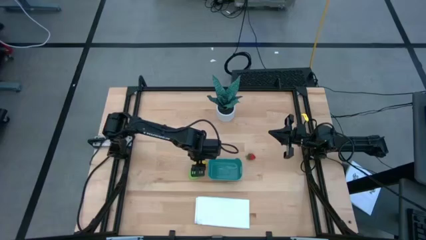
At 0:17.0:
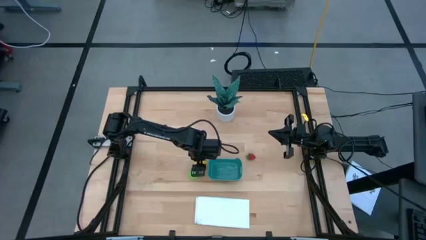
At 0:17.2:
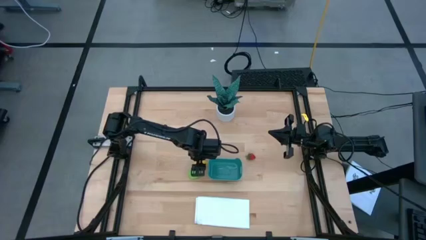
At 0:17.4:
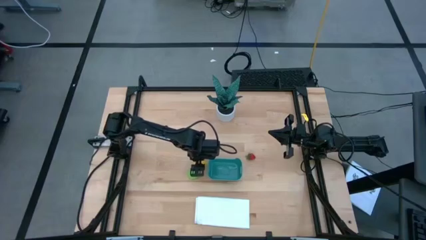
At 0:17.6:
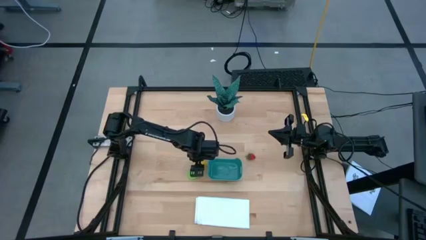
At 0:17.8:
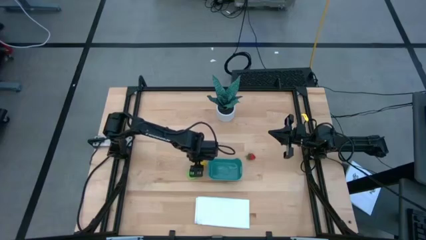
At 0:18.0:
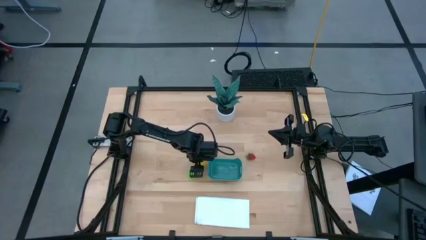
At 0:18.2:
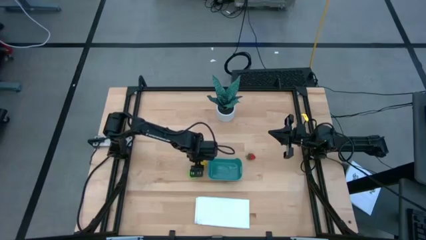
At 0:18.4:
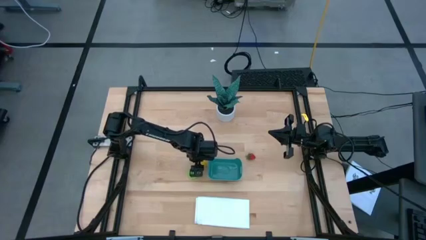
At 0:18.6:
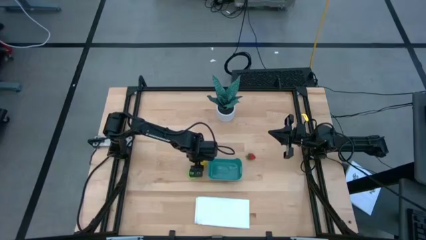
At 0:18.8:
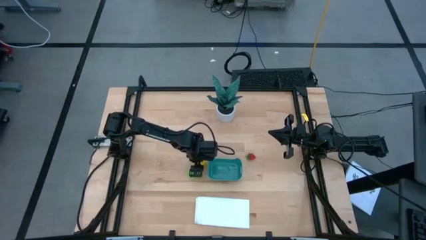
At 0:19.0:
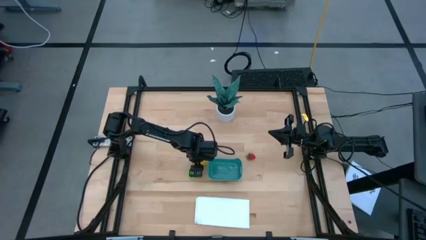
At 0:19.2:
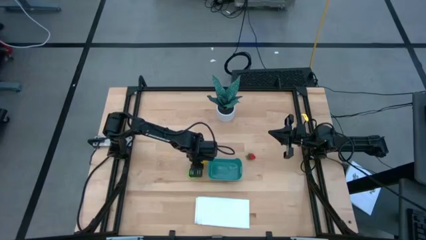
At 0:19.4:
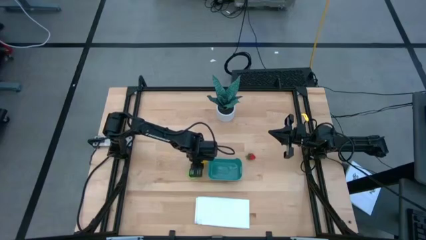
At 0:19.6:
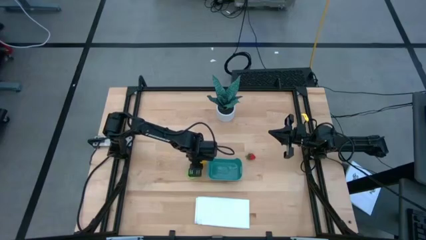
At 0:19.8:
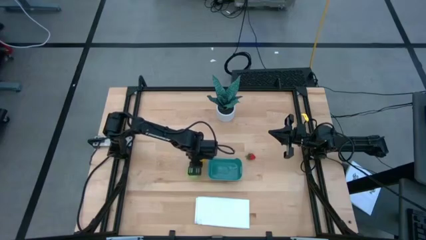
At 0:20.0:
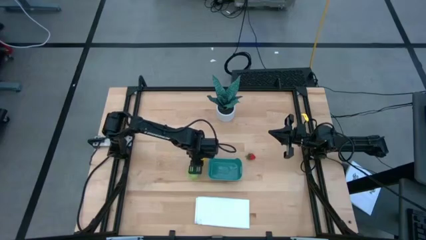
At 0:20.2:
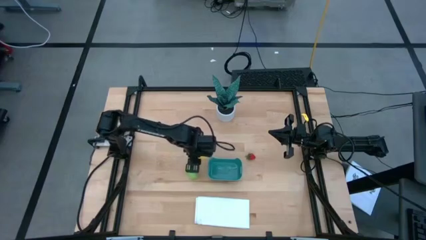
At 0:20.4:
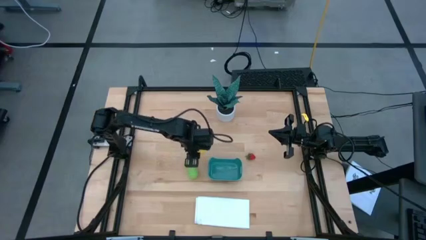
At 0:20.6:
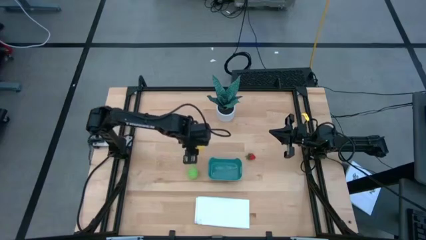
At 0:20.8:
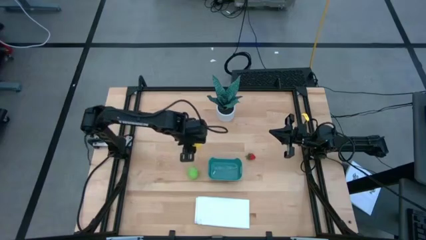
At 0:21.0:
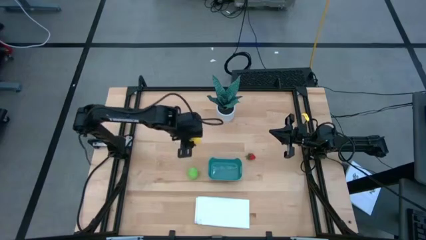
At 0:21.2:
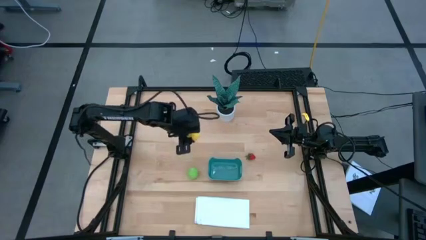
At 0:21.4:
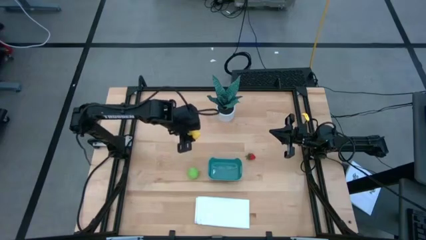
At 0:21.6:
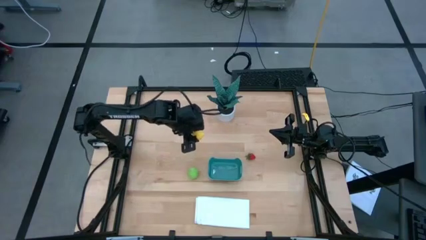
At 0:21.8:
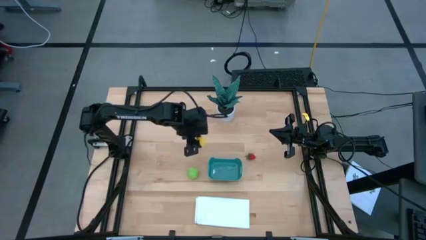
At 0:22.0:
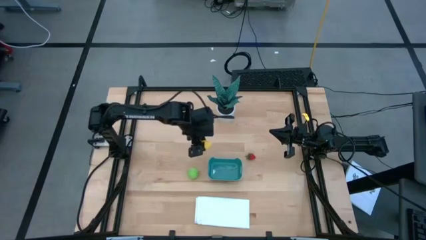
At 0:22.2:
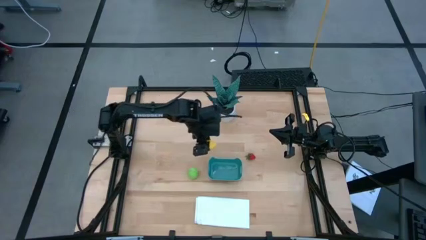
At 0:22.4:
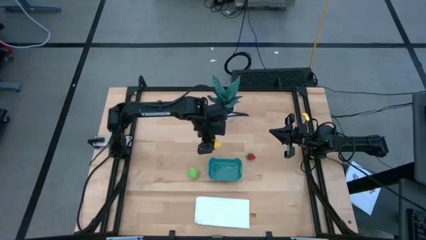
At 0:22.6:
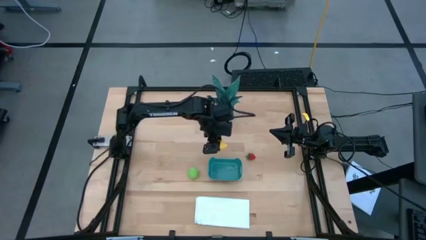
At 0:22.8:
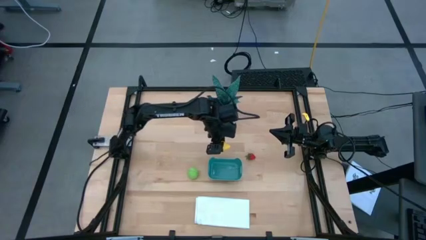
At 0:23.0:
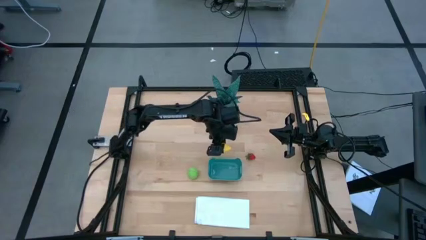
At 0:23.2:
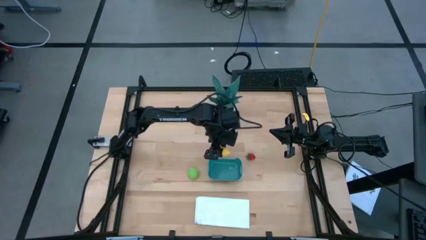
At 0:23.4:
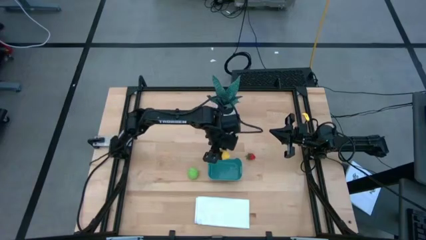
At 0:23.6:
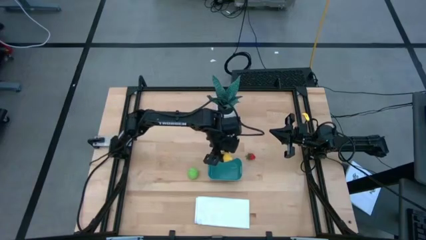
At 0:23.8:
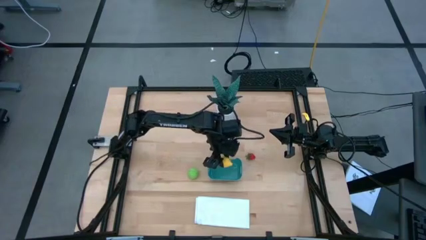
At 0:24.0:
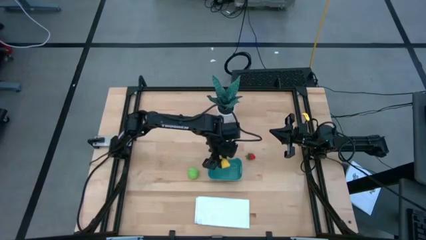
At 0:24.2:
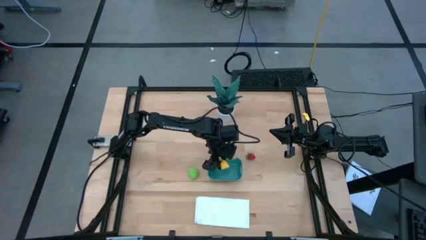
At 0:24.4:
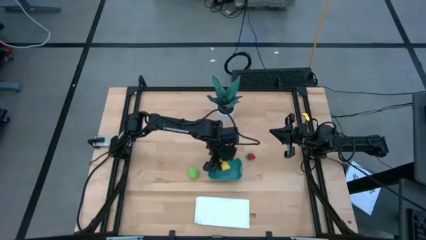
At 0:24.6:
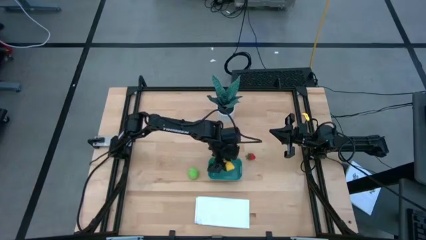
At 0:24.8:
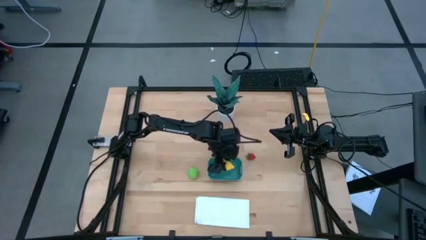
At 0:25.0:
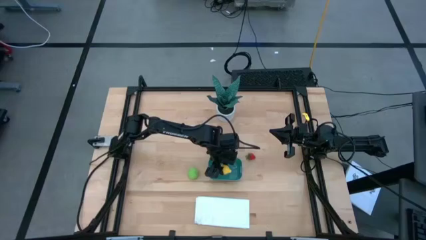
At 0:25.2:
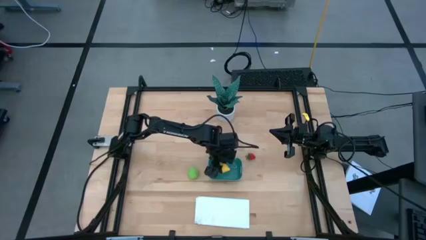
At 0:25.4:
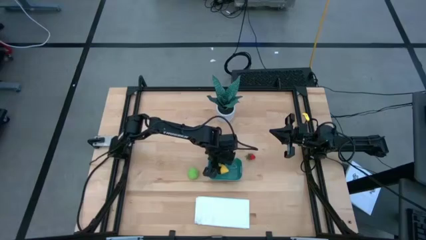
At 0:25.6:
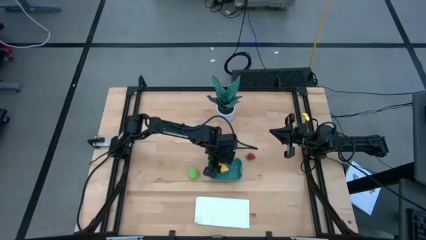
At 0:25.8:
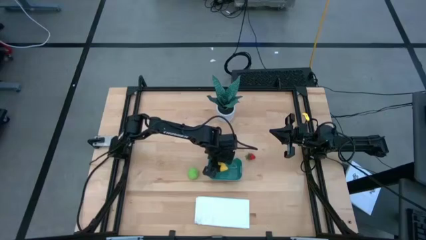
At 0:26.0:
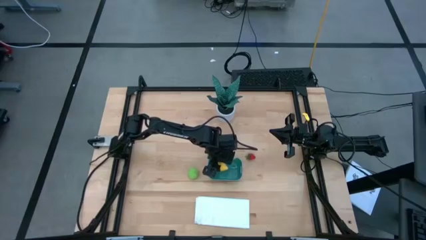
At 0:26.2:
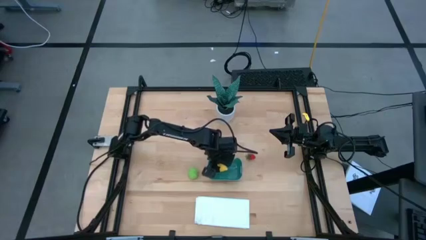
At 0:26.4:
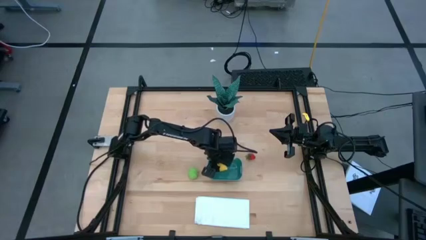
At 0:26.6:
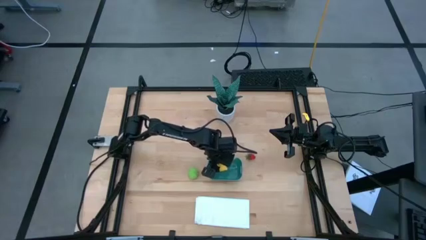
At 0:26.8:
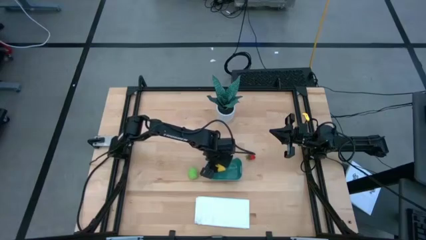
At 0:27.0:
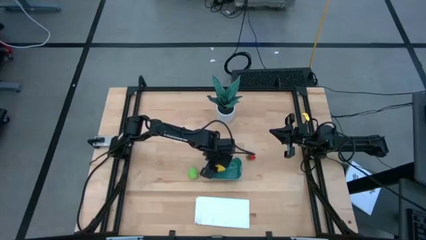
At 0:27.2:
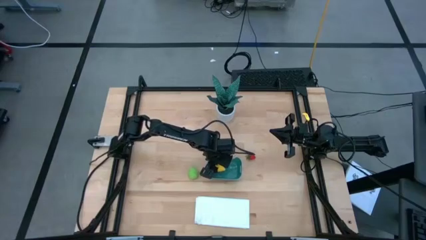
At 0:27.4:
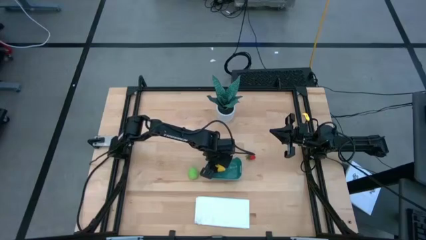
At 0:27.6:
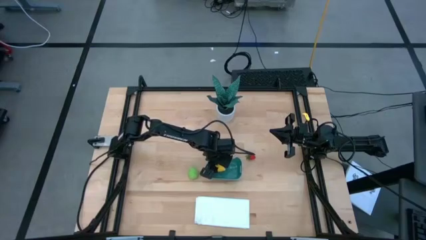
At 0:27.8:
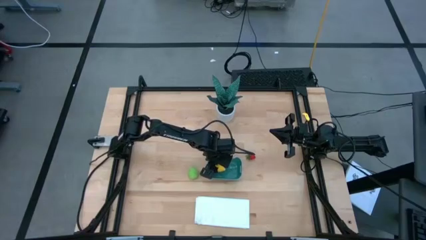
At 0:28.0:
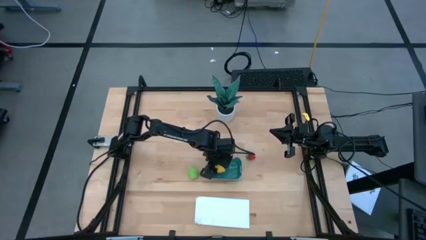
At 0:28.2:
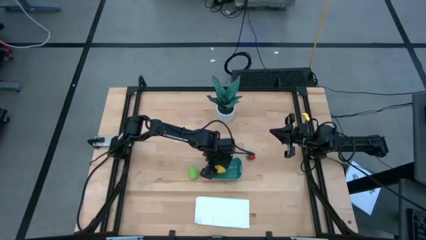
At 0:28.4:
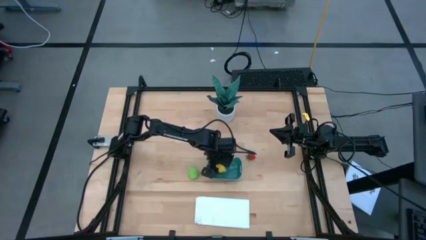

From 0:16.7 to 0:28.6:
Task: Pick and placing Produce into tupperware
Put the yellow lemon into the green bin

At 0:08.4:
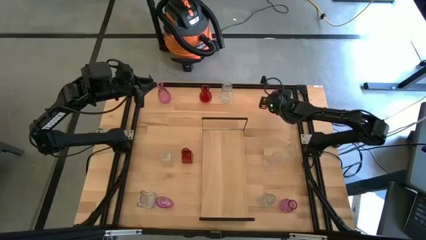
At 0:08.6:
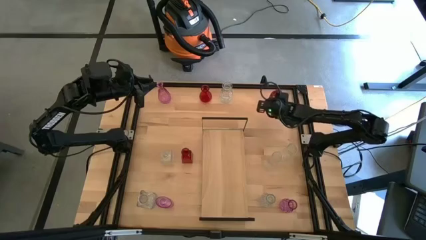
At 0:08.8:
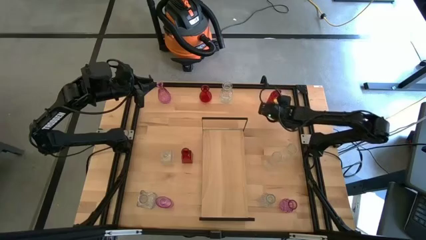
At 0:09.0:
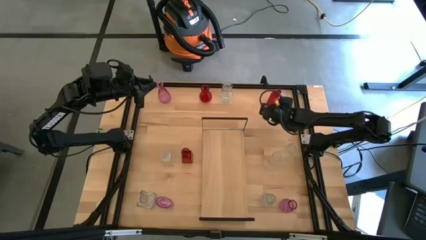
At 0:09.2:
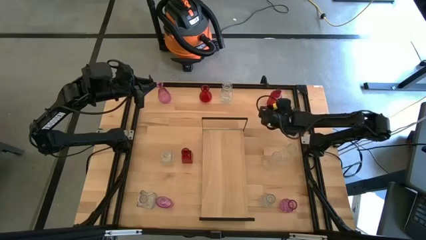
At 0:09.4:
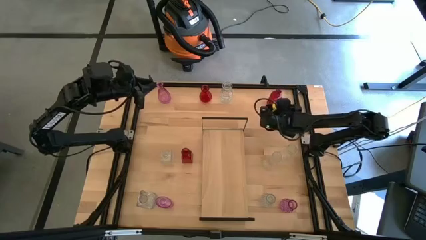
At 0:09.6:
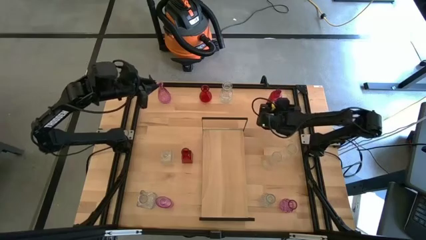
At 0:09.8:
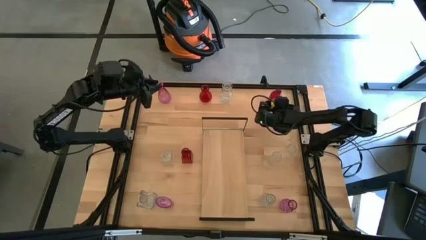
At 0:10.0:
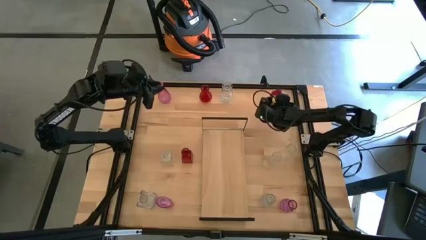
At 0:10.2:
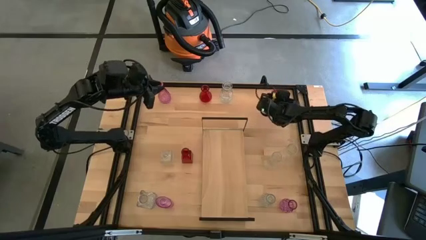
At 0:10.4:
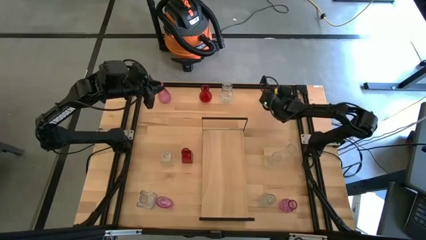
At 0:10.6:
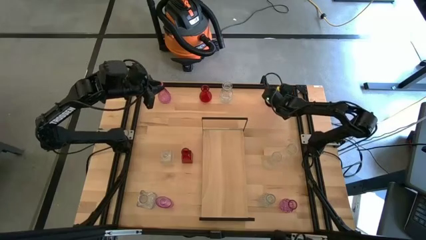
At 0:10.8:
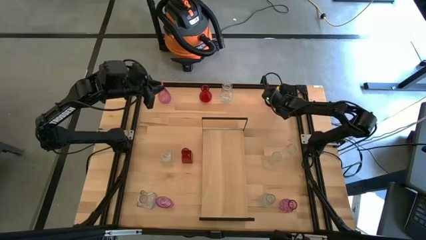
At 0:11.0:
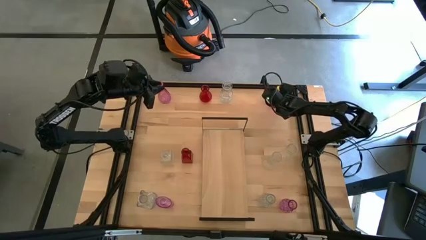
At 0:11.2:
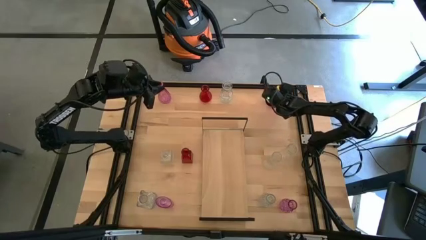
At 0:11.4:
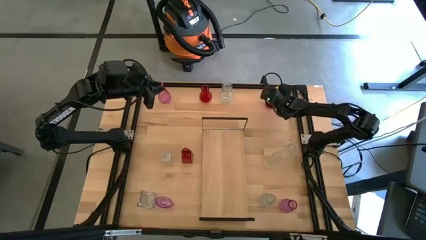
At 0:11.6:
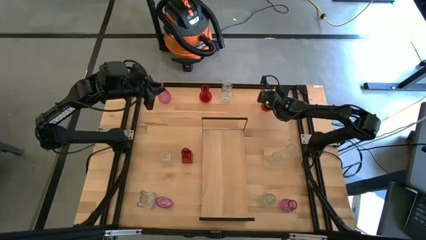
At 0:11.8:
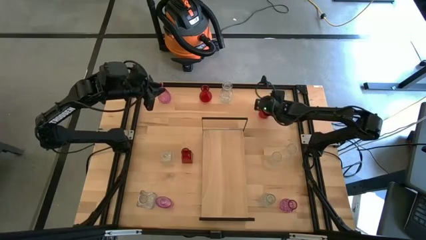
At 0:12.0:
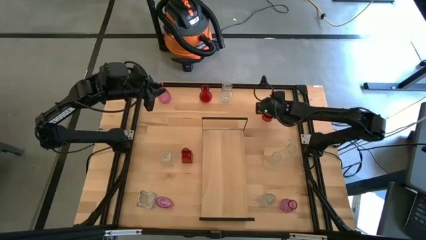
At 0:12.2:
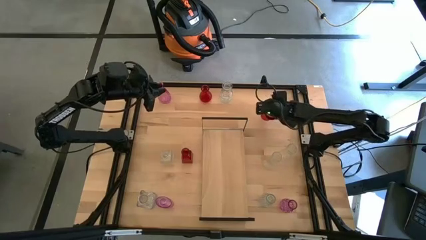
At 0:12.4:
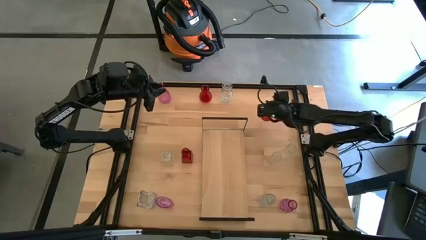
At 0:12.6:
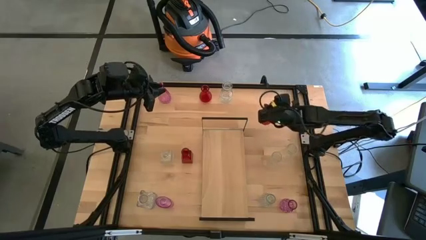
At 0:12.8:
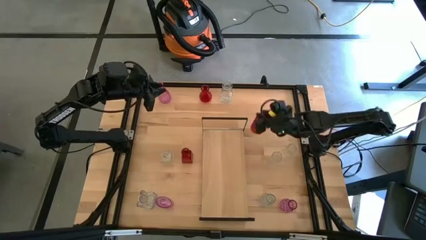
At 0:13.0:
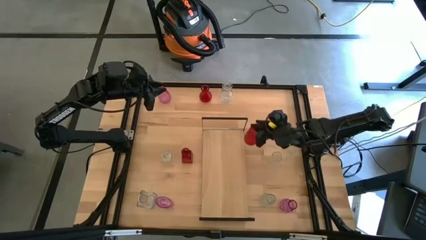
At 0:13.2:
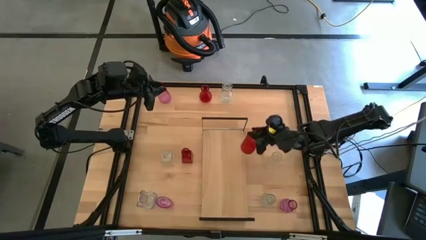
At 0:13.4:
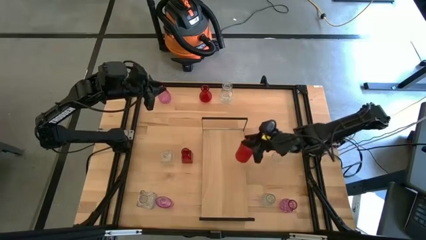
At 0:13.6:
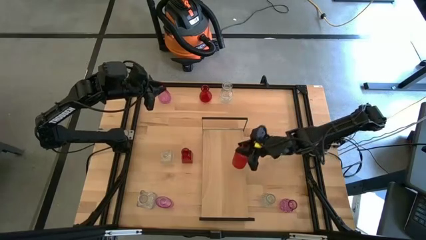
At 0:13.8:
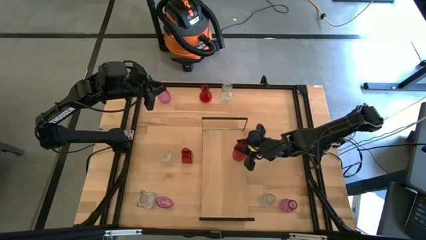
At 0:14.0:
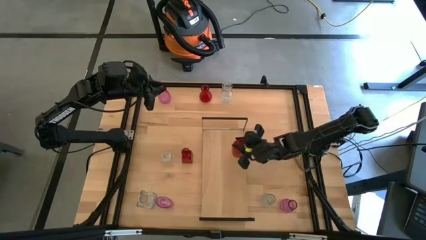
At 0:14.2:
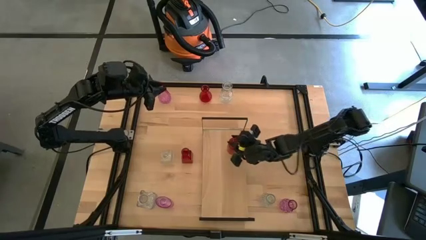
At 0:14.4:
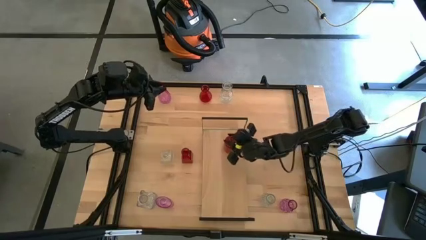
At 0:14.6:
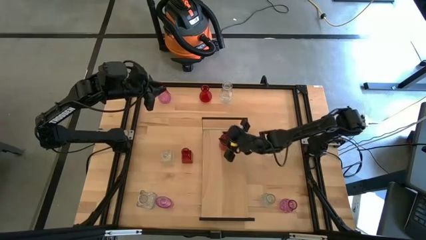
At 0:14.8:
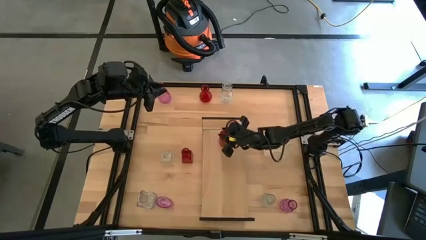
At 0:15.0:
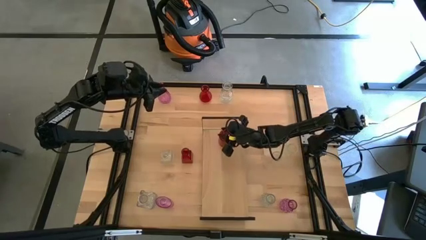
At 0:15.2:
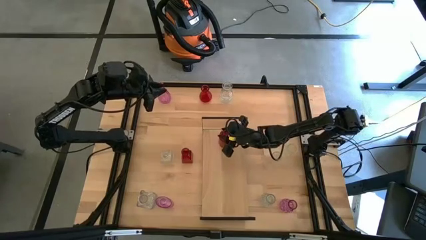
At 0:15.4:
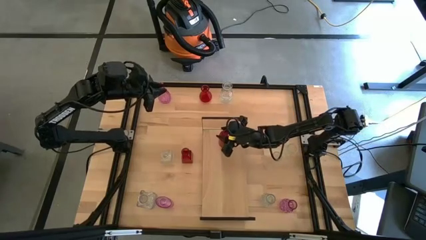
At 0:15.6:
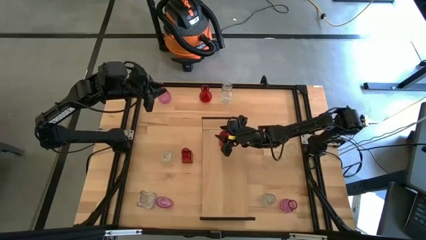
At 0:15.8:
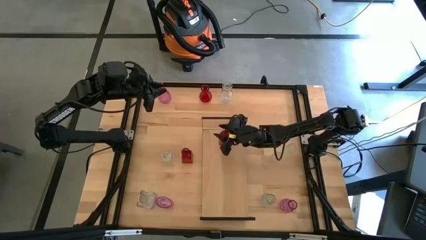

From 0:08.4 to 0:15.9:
Task: sort vases onto shelf
Put the red vase on the shelf
